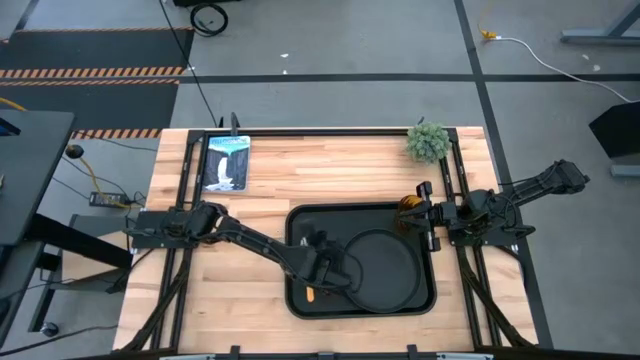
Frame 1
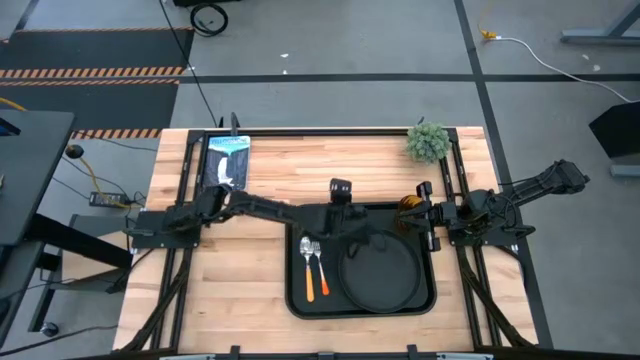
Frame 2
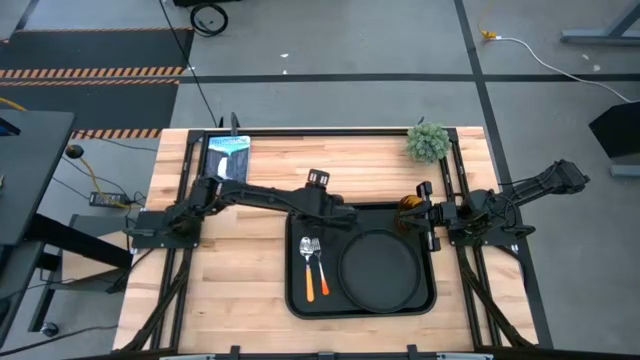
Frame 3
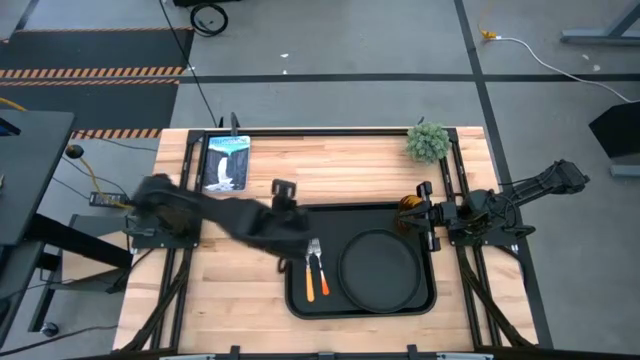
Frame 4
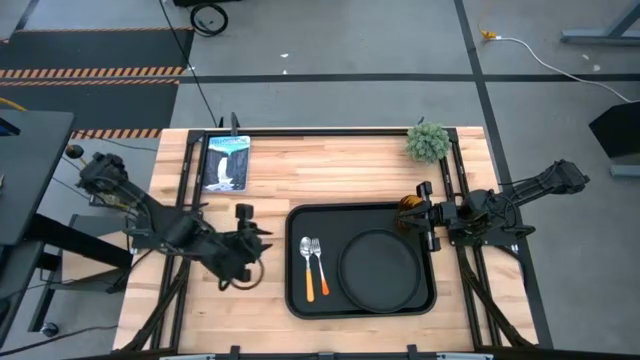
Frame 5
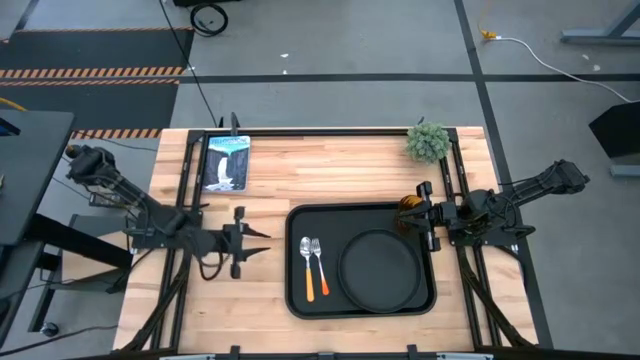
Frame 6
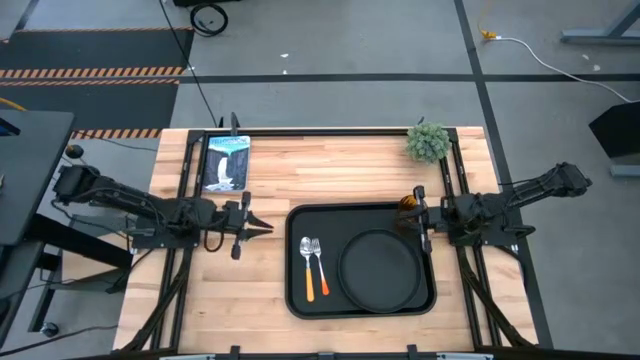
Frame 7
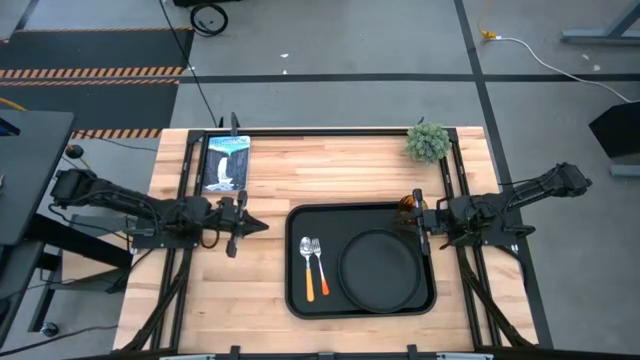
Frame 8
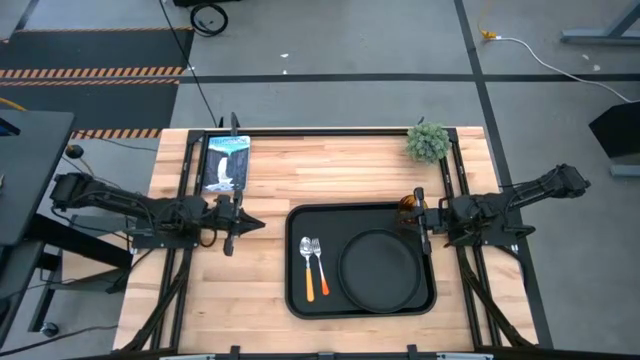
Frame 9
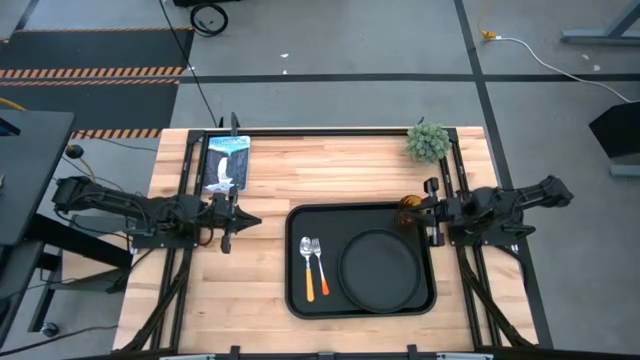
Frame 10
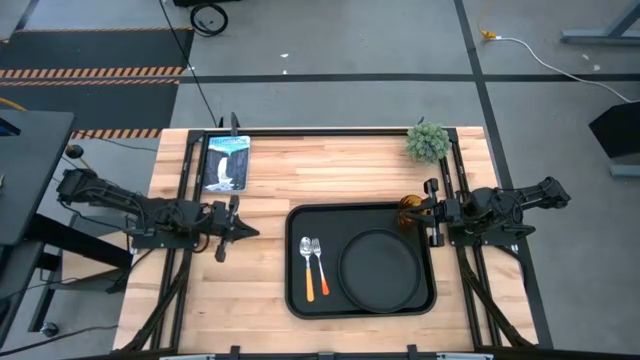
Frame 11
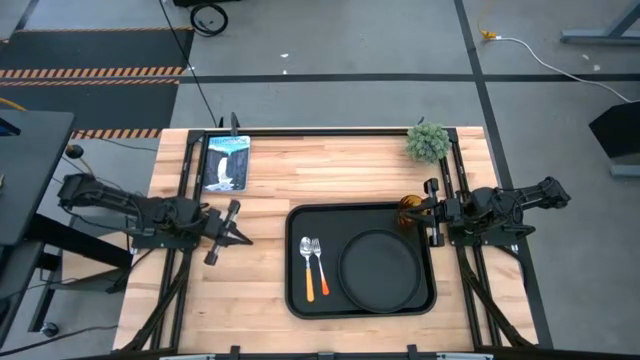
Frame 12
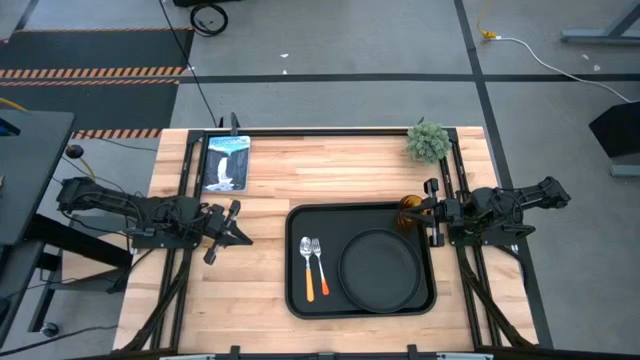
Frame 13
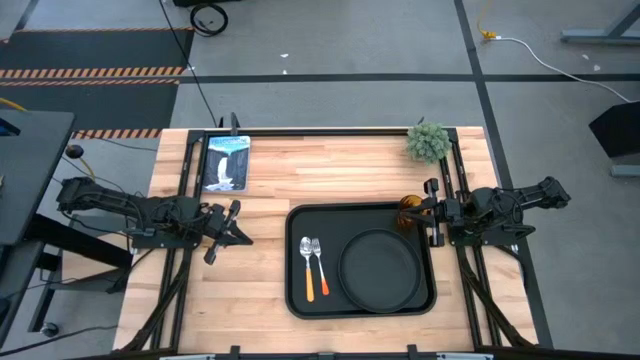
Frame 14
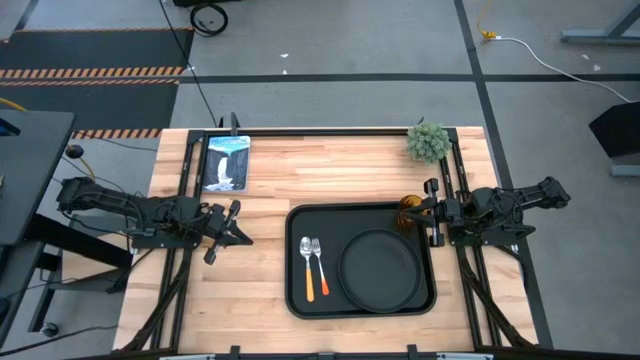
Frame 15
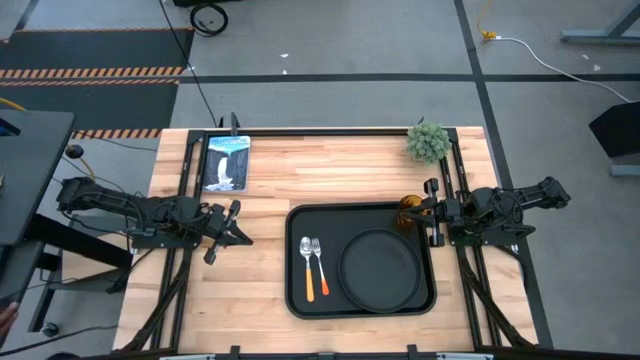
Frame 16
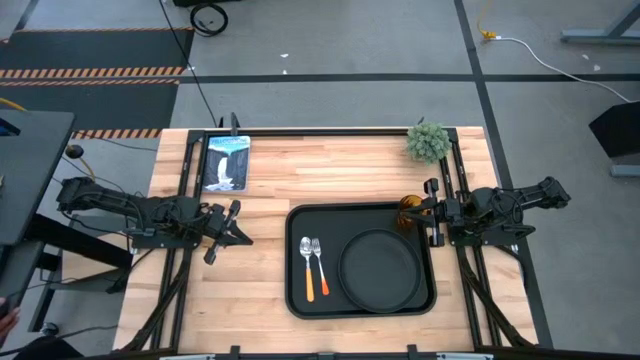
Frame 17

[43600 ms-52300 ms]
Task: Pick and place plate/cup/fork/spoon on tray
Return to Home Position

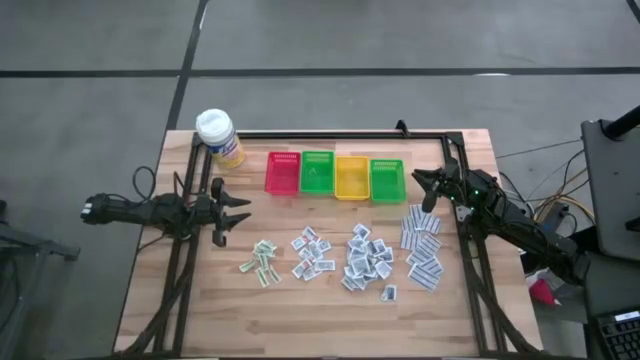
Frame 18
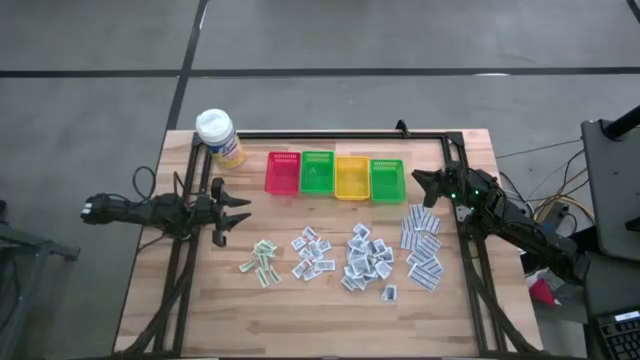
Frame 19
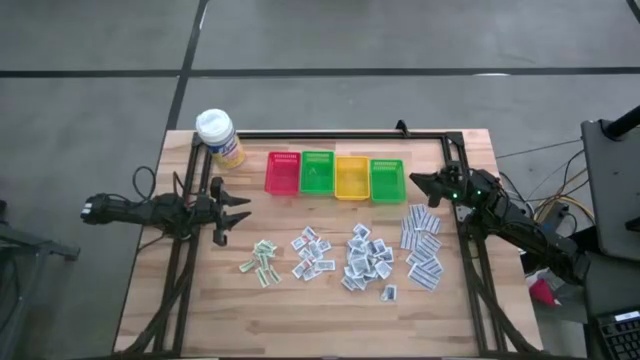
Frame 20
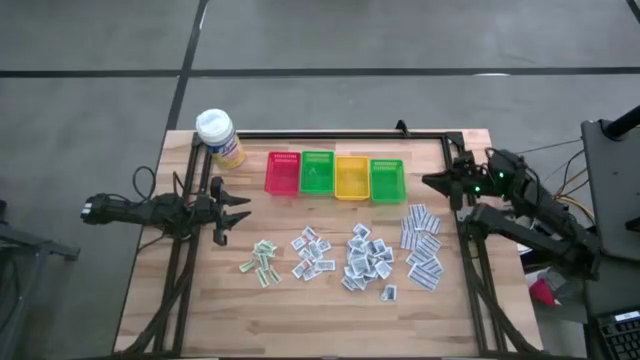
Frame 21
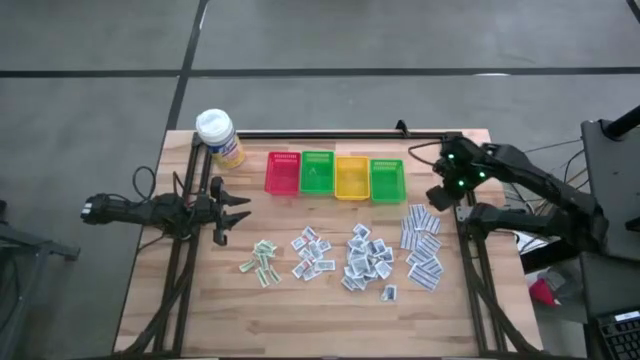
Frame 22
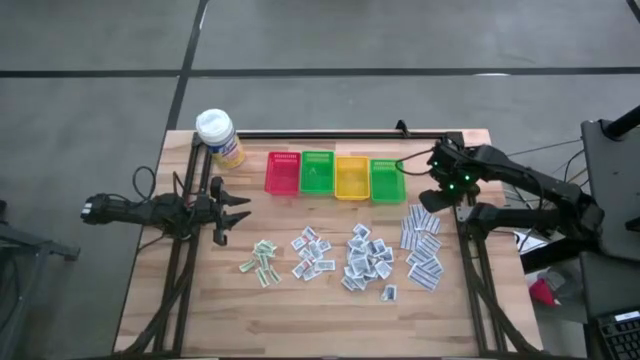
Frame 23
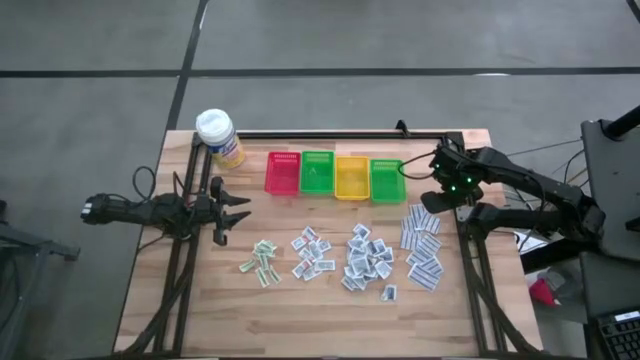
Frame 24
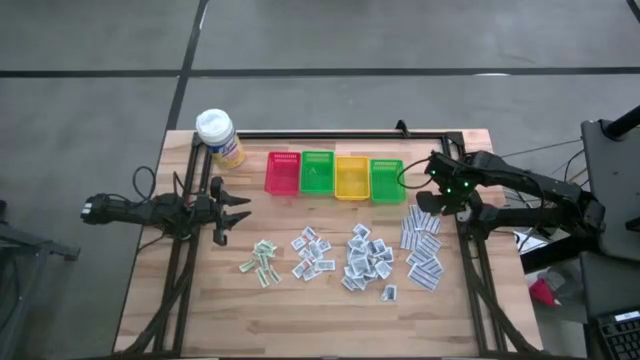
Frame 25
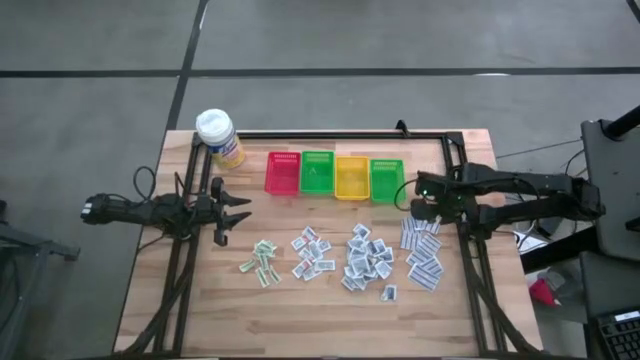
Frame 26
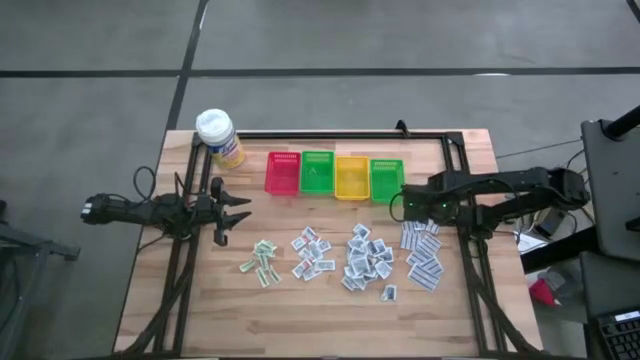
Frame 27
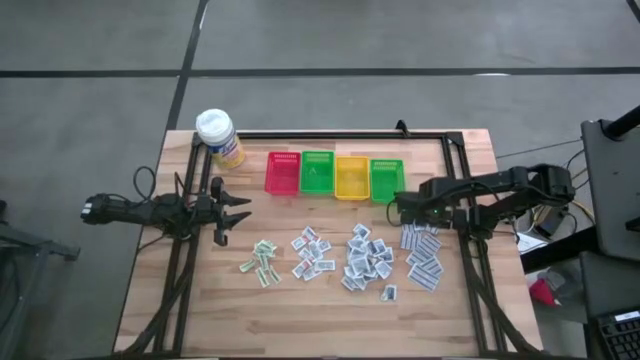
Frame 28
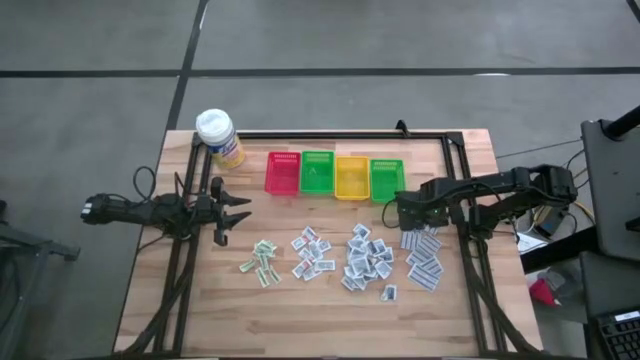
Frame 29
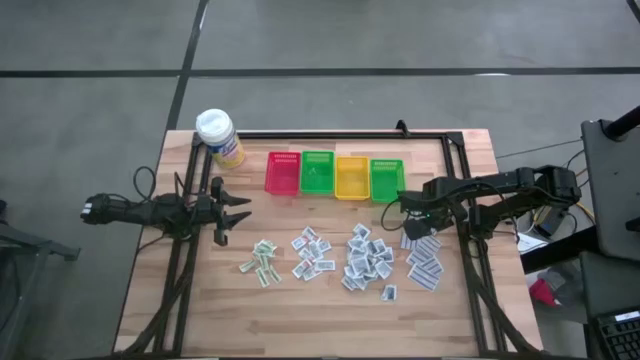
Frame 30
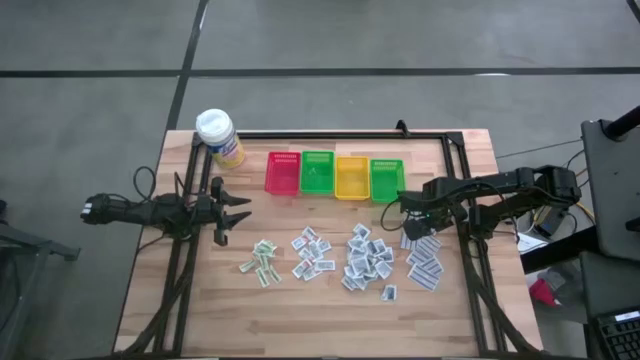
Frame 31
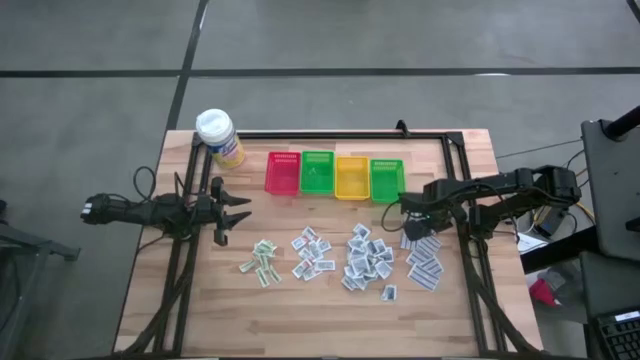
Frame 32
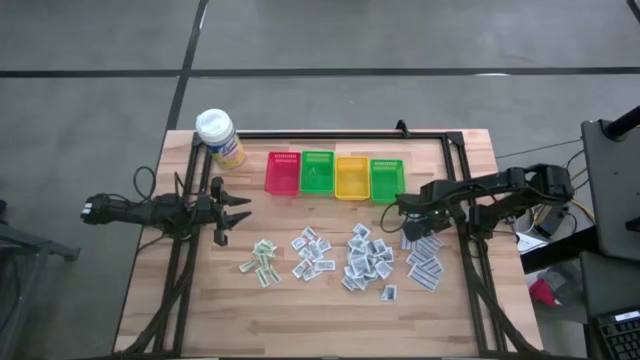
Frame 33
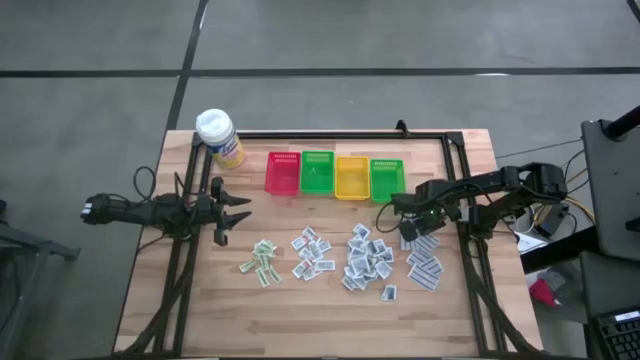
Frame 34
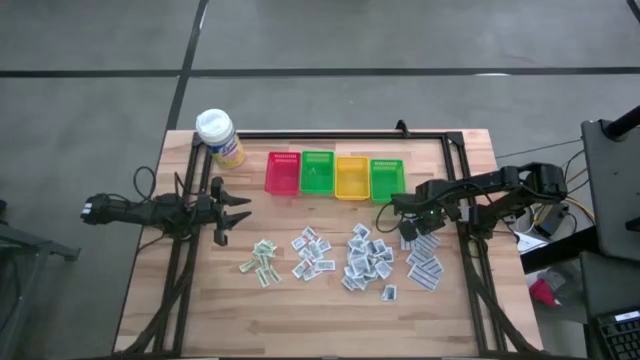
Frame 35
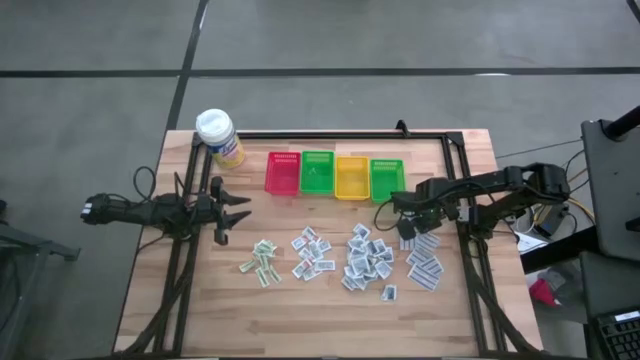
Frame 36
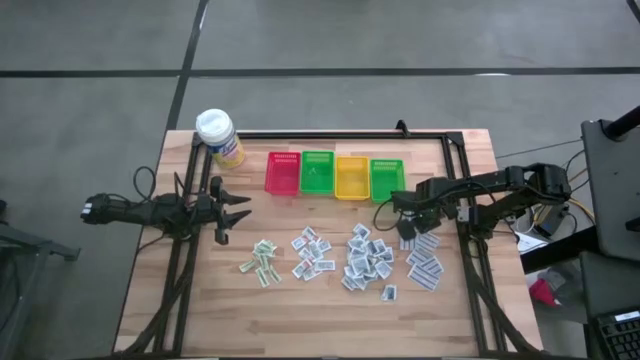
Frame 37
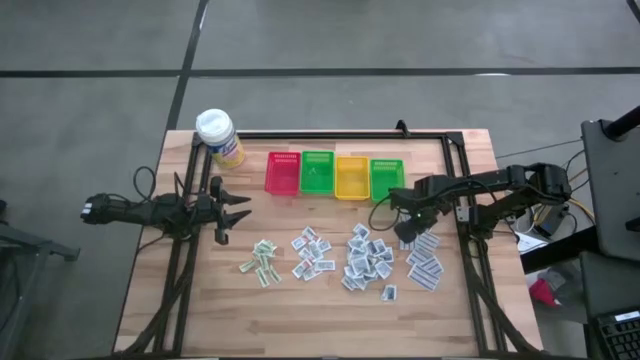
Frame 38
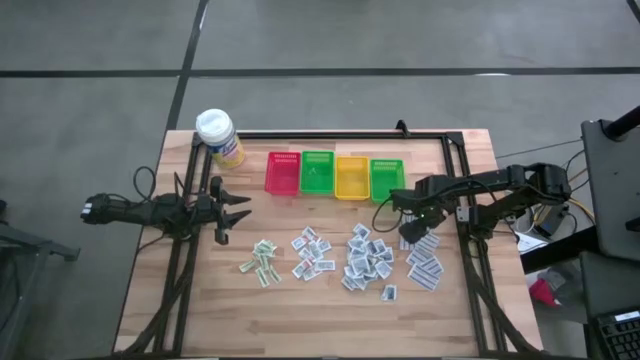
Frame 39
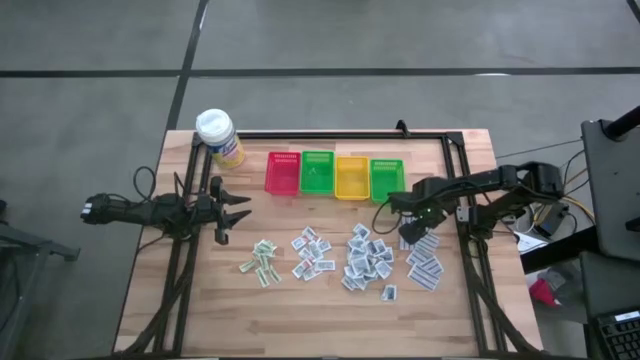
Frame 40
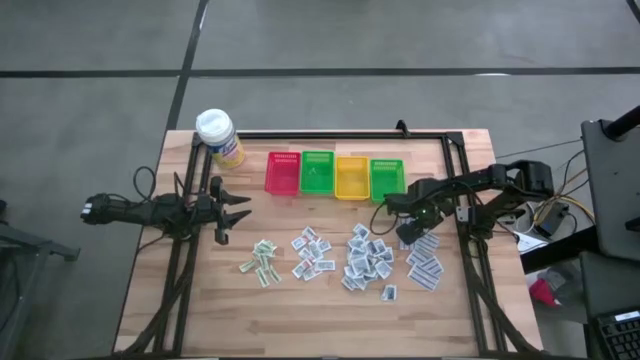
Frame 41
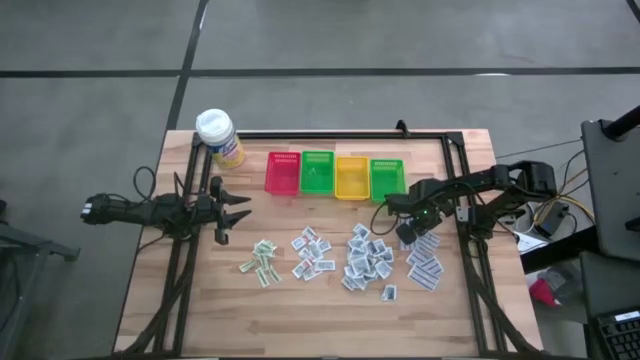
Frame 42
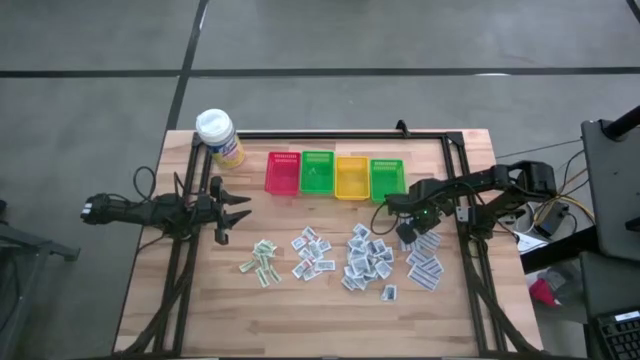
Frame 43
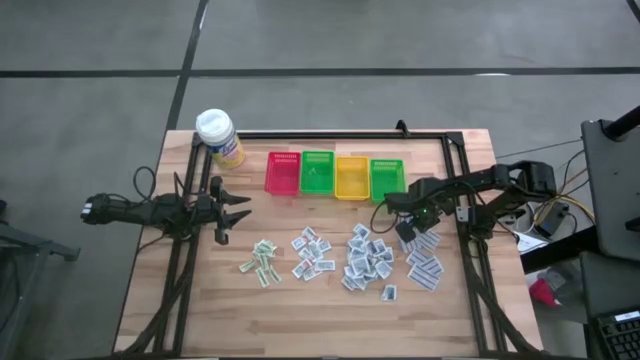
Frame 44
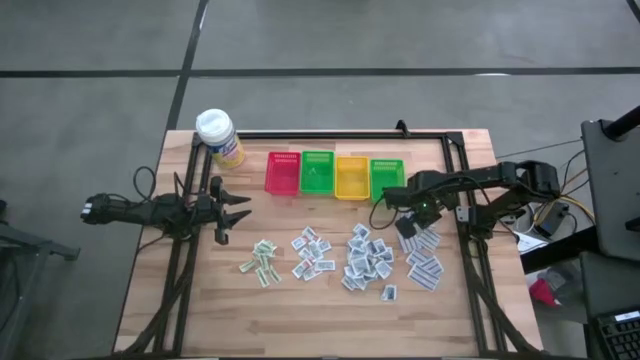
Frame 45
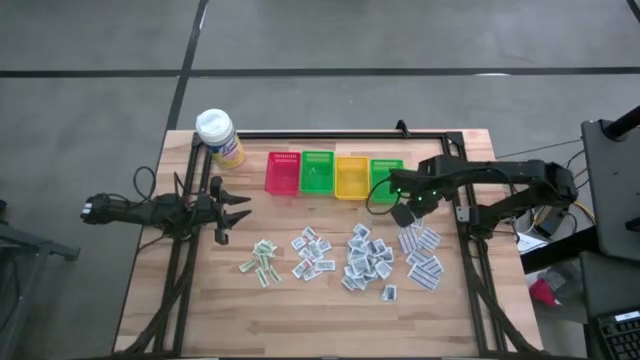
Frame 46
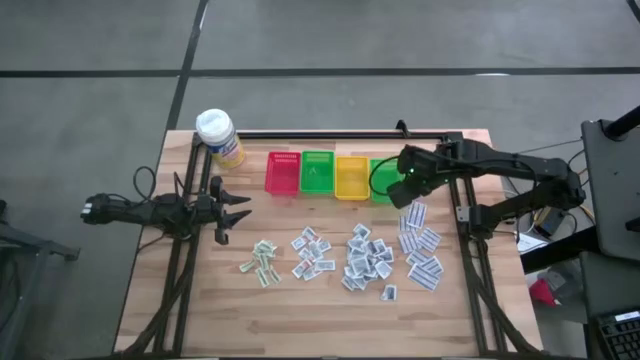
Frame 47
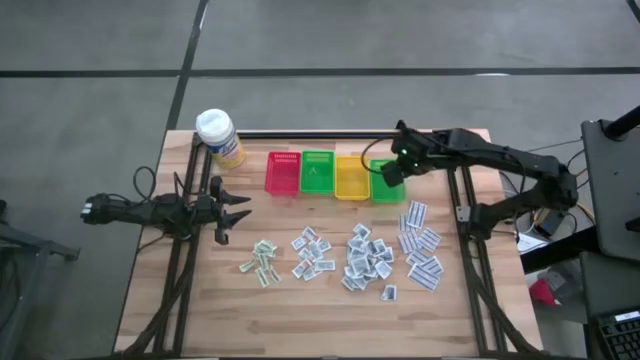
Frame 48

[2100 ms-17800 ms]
Task: Pick & Place First Aid Supplies
Put the blue bandage into the right green bin
